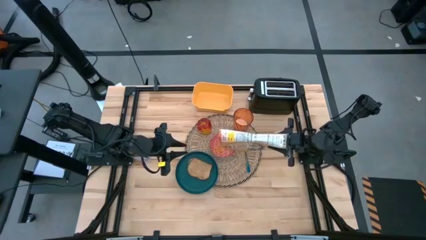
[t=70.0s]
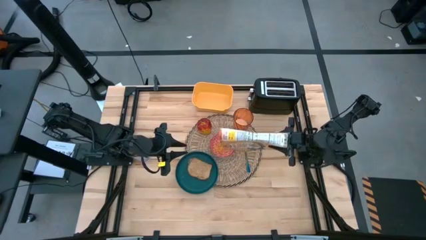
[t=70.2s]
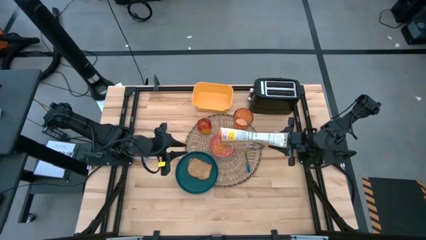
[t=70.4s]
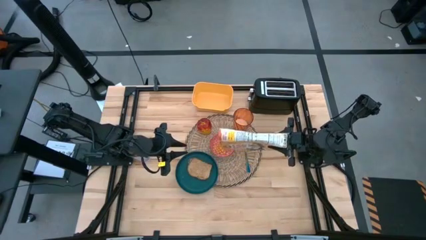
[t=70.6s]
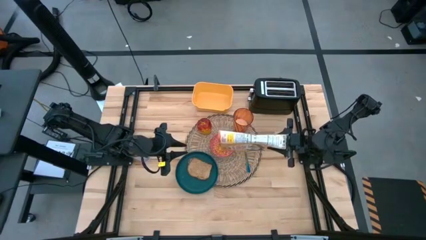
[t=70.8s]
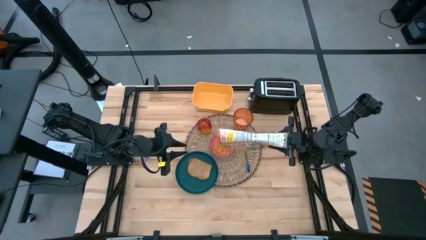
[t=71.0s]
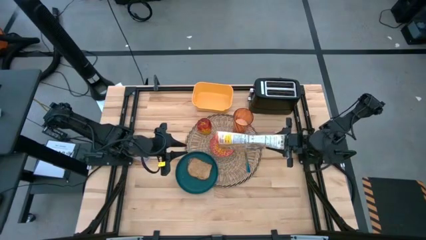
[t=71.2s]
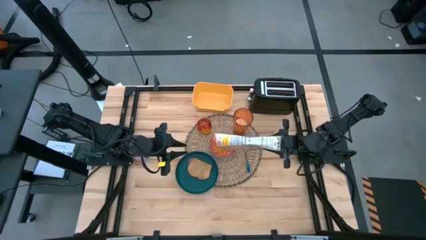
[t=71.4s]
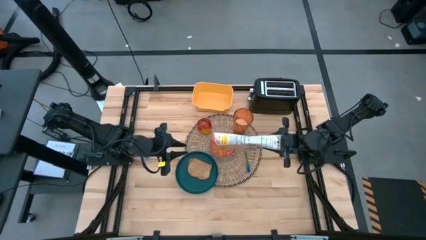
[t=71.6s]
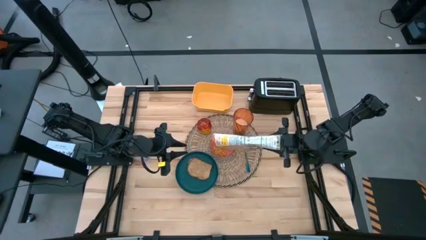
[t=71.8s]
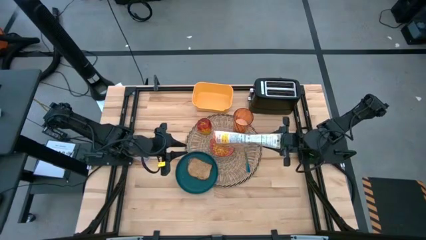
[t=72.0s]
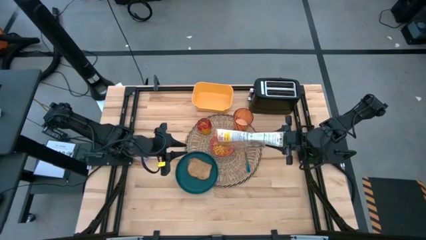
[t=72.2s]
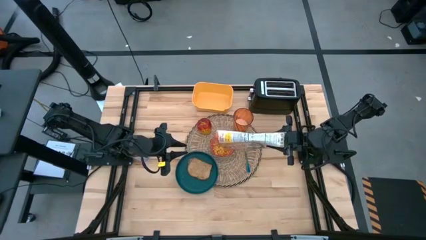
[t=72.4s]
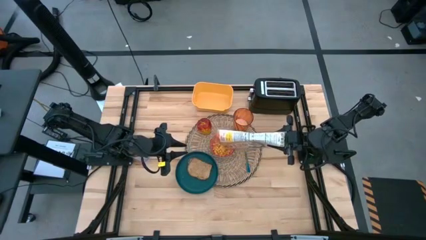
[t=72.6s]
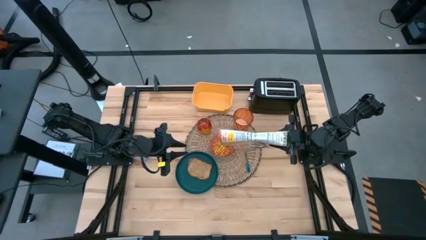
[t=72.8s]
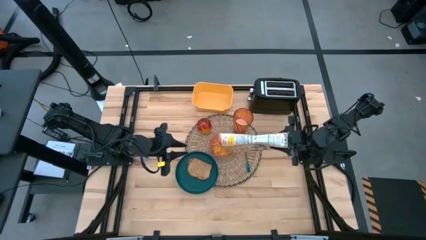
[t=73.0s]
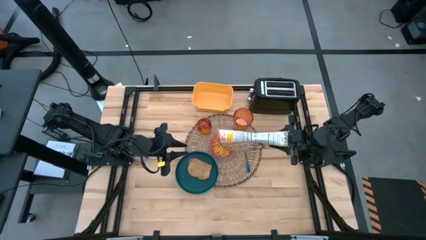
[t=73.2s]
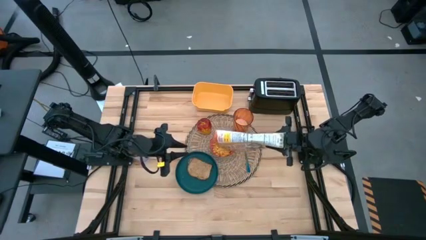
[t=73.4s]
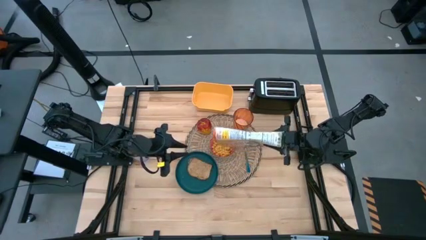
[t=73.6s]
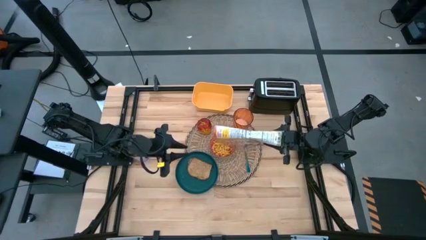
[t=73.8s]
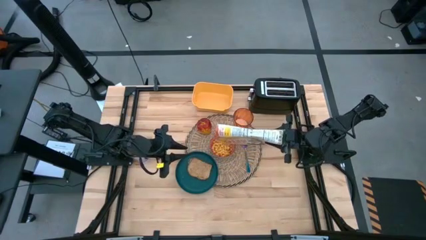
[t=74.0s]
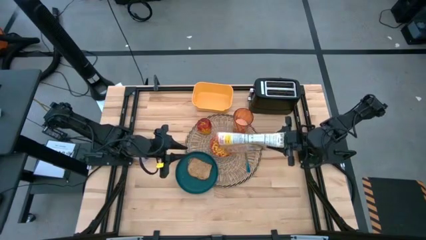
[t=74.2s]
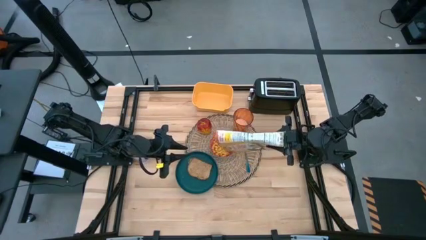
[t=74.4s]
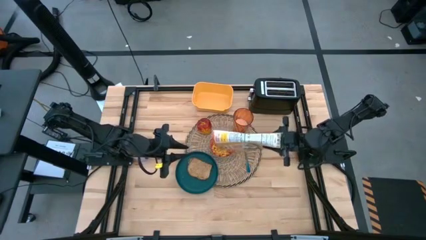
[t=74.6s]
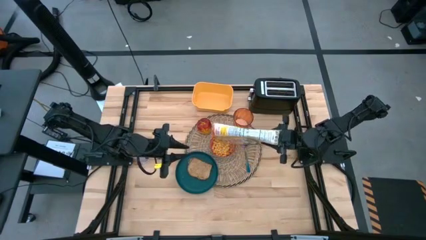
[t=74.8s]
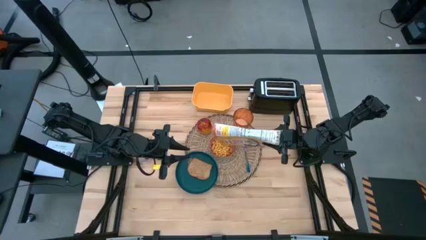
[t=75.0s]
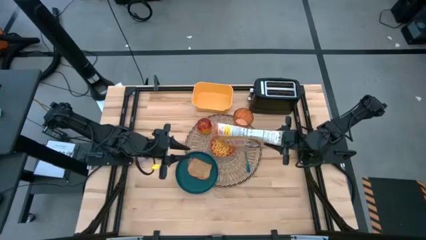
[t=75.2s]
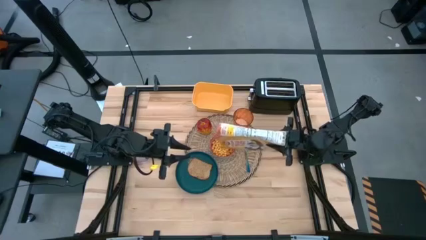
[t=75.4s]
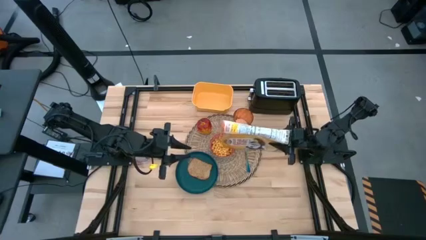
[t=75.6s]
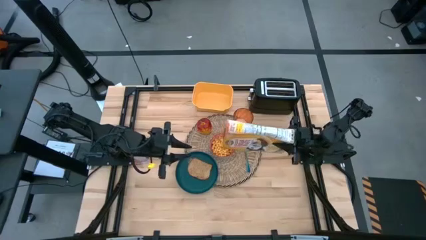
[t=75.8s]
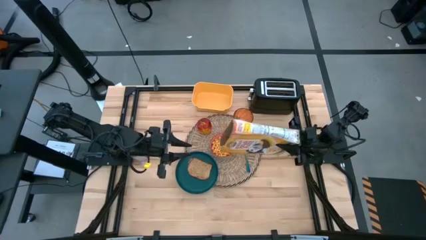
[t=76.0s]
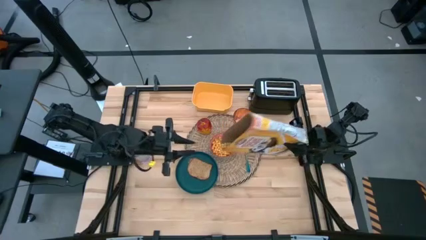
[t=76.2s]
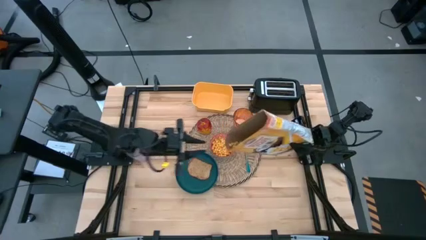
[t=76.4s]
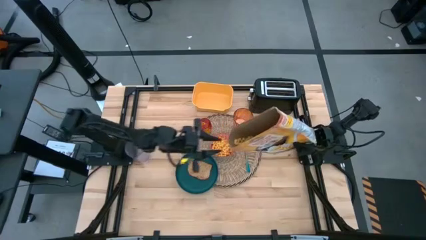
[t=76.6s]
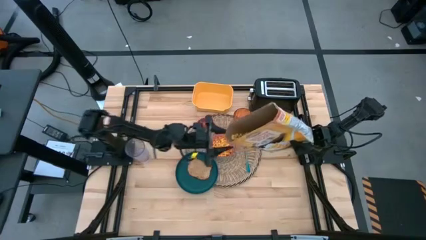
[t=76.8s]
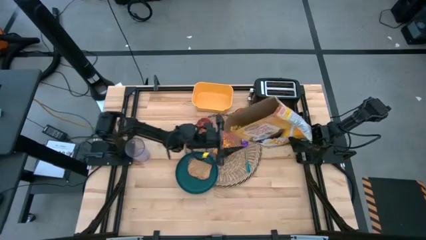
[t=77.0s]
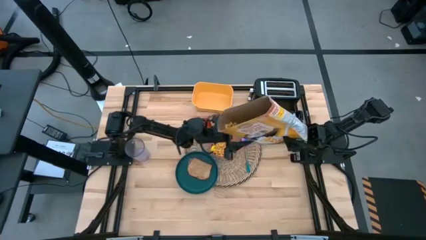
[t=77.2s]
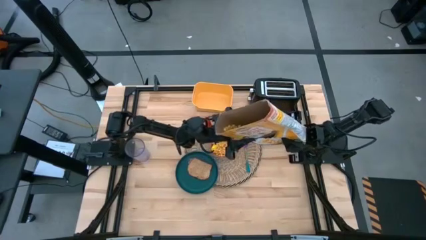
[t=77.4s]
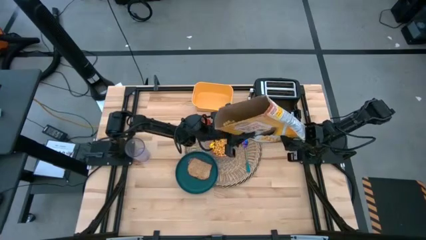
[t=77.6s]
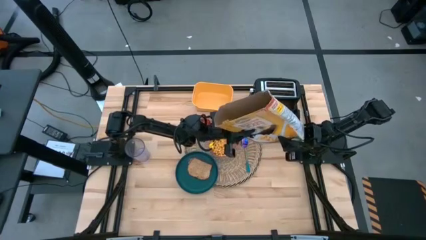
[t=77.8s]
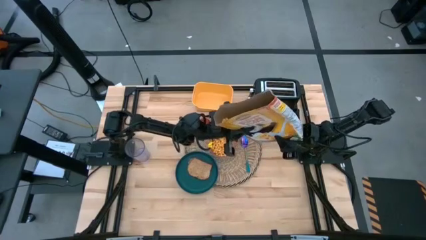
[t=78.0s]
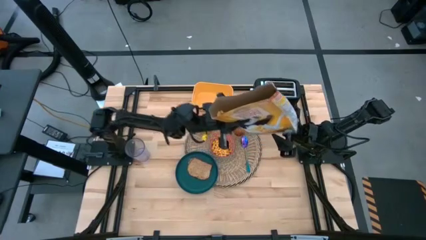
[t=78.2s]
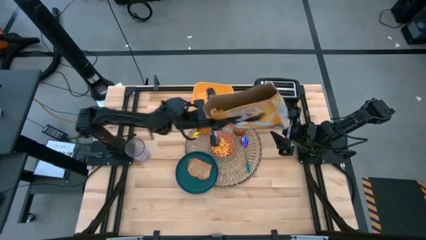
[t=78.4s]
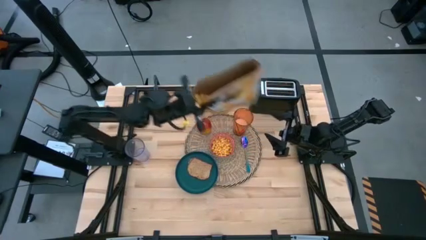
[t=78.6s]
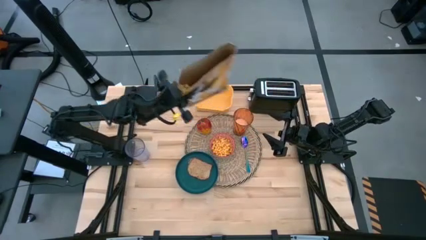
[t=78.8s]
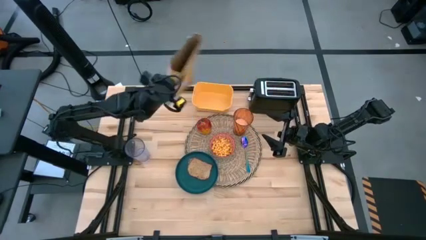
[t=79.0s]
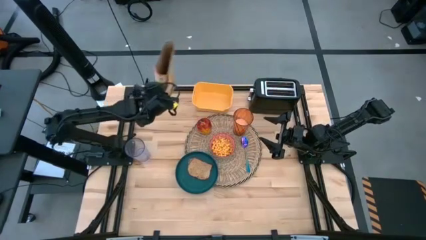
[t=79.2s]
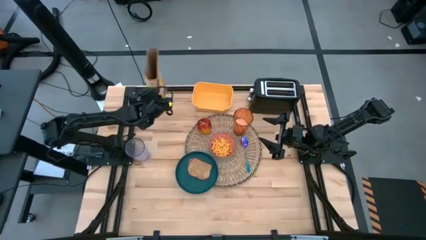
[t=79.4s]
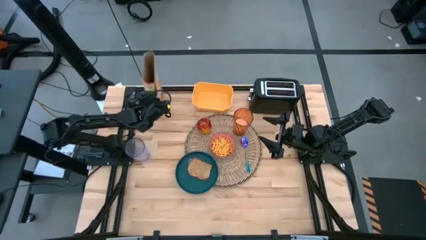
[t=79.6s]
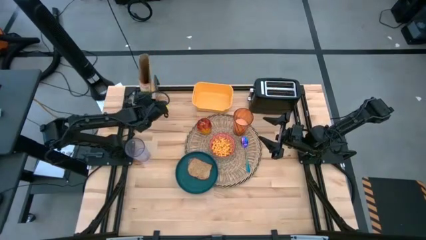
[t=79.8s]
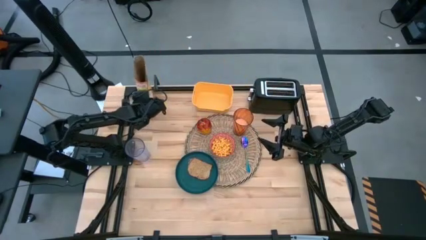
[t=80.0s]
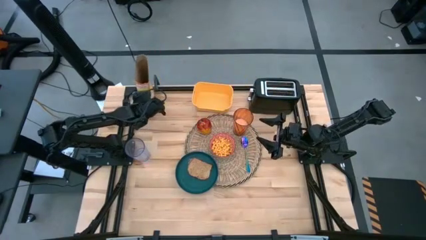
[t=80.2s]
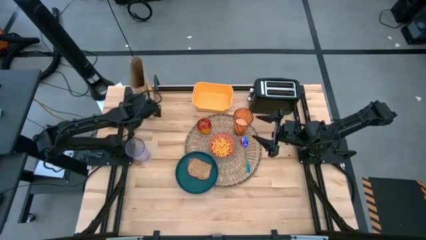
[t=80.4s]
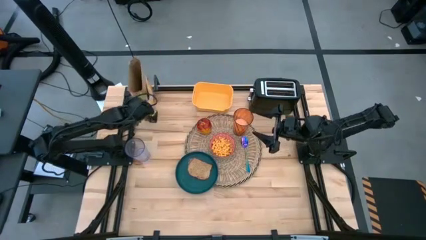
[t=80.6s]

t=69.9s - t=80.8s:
Task: Arrange a breakfast setting
Pour the cereal into the red bowl

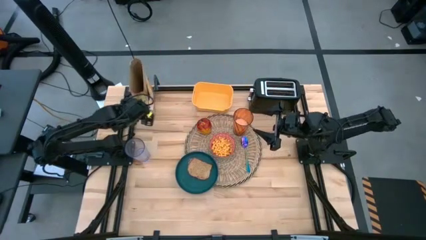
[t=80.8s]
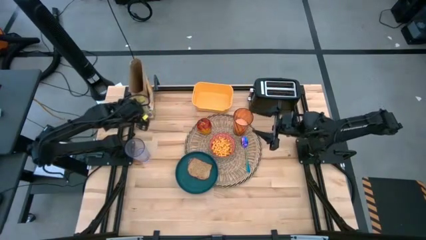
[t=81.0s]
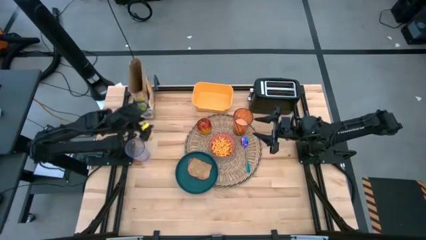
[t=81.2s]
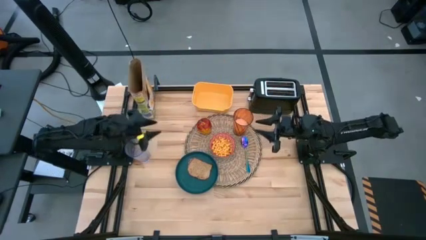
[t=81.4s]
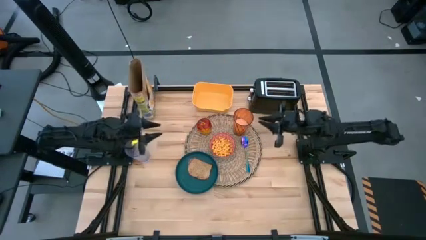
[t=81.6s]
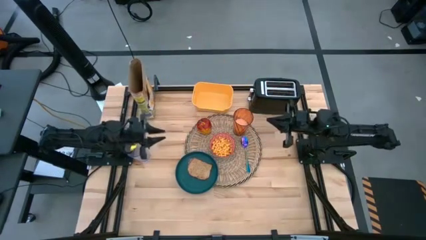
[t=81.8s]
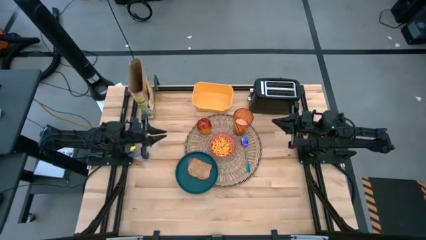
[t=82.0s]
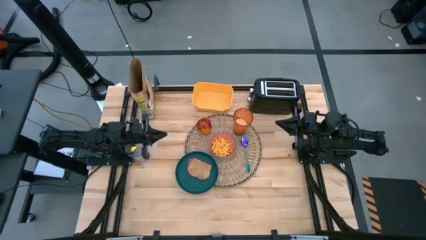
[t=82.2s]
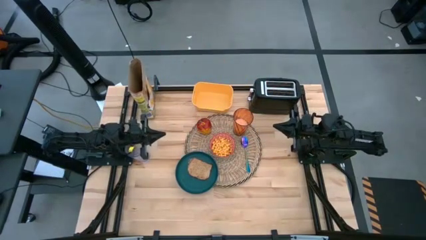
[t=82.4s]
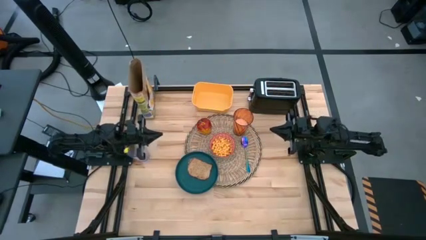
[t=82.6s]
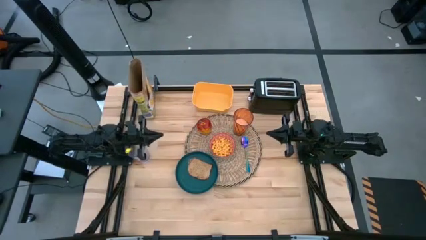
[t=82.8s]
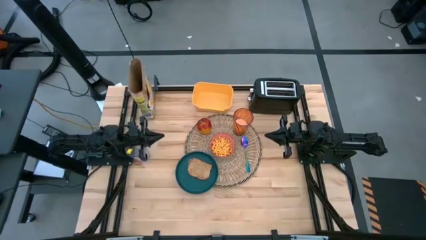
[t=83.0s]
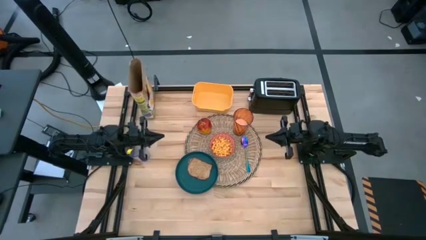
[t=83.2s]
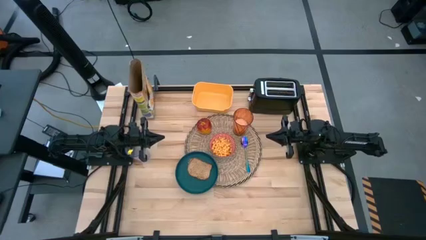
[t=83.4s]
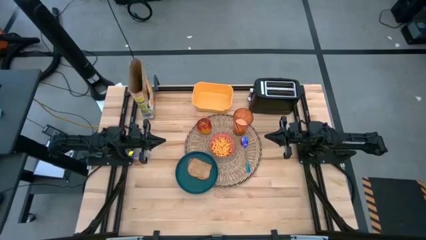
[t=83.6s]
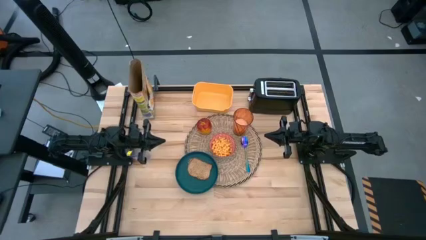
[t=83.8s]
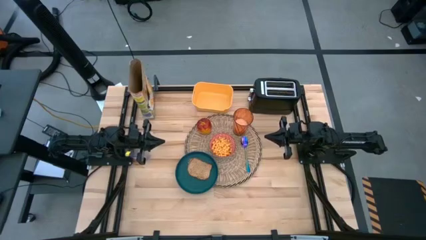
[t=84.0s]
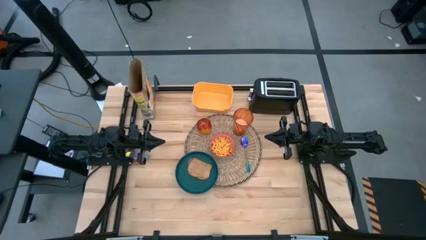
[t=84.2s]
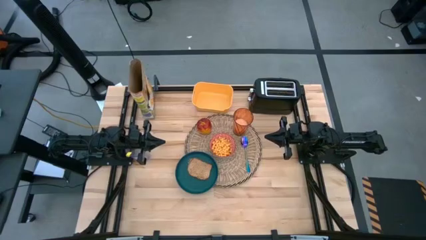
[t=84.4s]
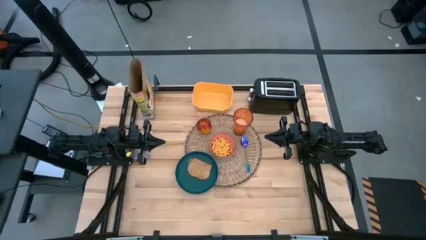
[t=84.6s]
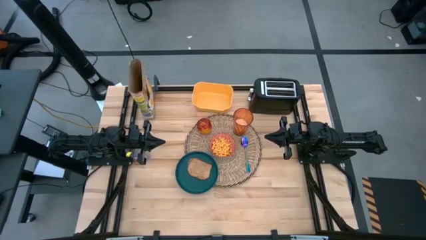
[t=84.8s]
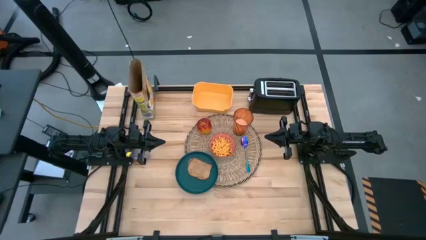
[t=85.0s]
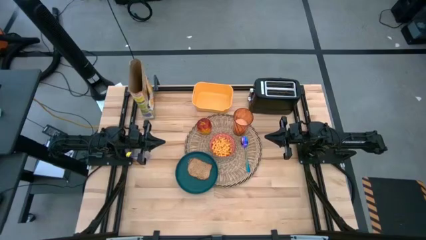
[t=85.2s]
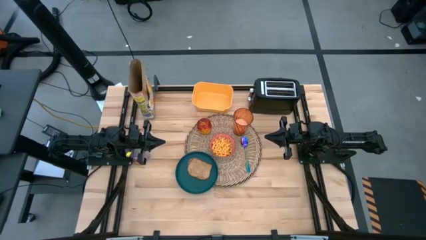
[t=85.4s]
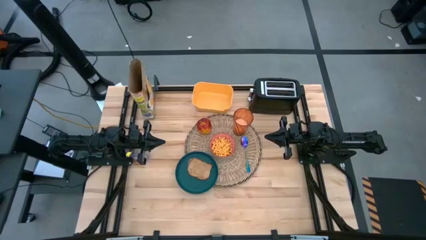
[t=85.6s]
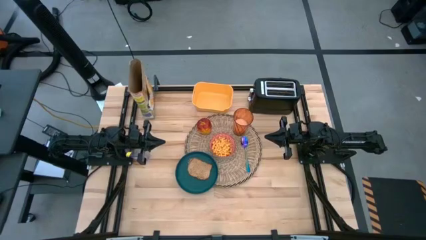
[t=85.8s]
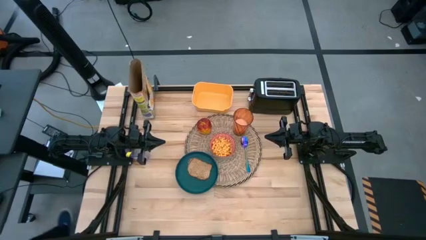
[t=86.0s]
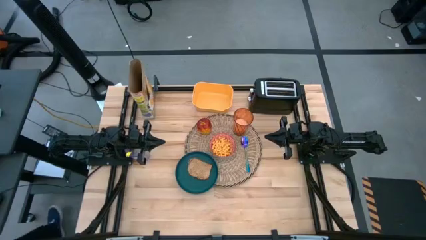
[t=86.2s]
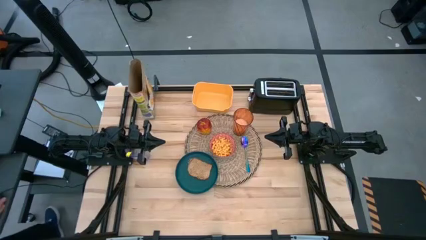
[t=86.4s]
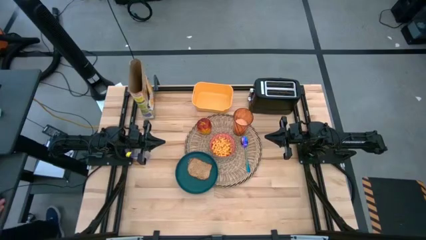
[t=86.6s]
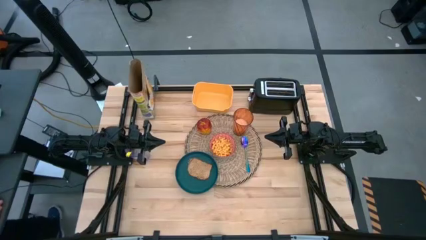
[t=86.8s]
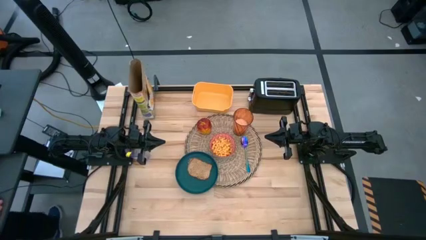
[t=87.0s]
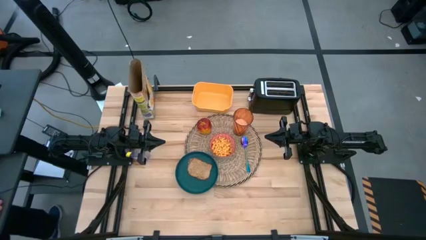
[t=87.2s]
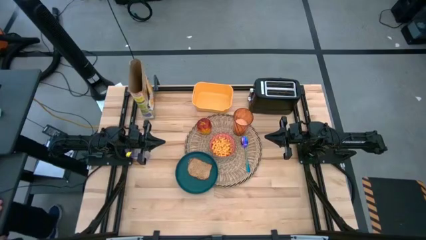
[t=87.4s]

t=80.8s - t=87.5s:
Return to Home Position
